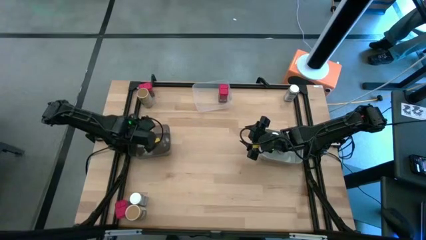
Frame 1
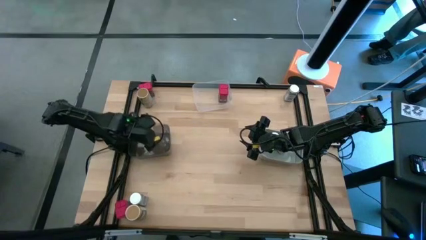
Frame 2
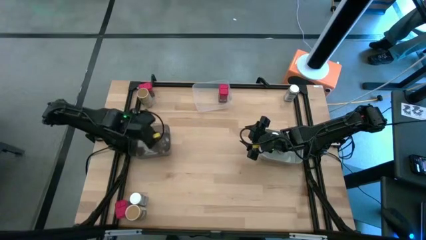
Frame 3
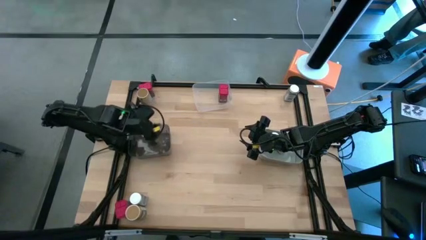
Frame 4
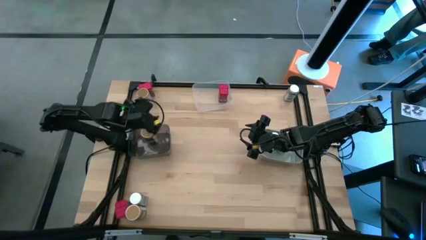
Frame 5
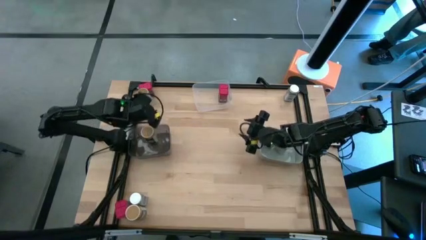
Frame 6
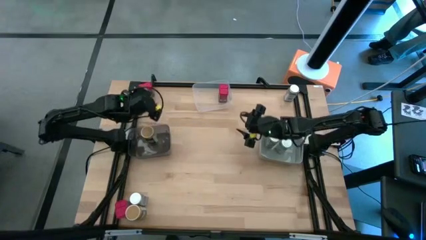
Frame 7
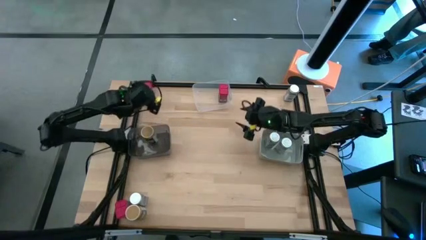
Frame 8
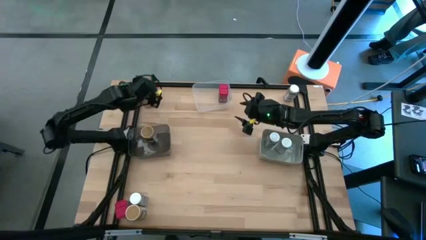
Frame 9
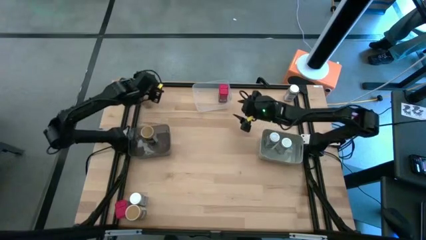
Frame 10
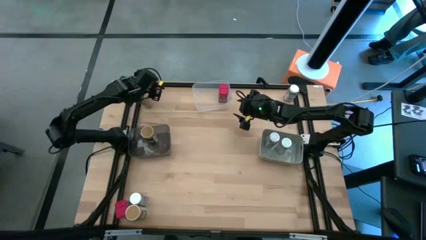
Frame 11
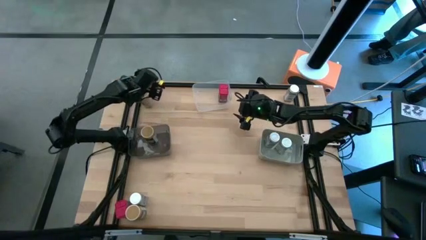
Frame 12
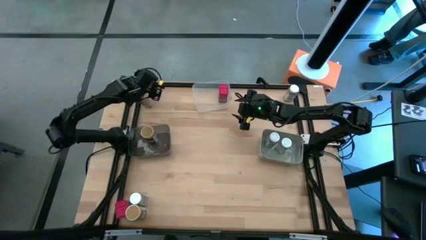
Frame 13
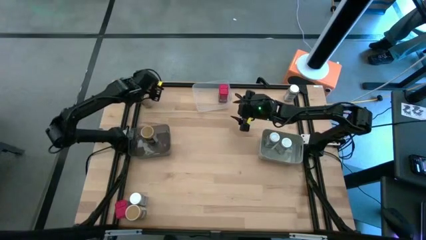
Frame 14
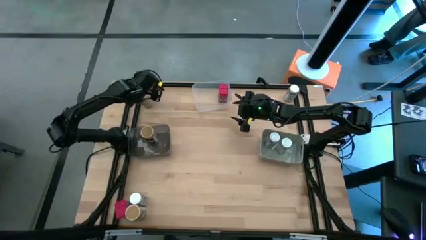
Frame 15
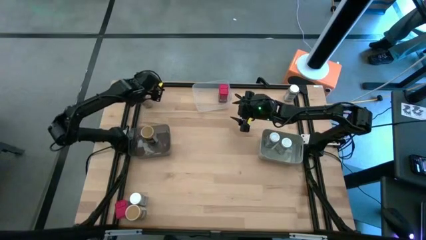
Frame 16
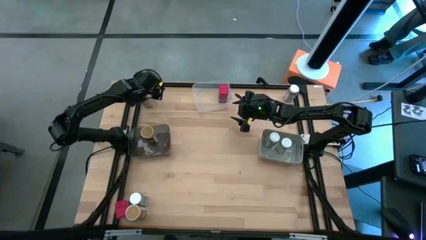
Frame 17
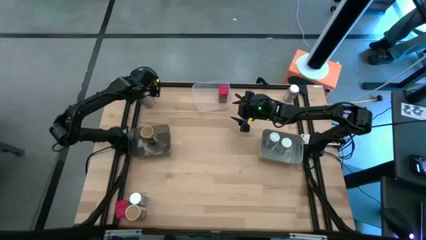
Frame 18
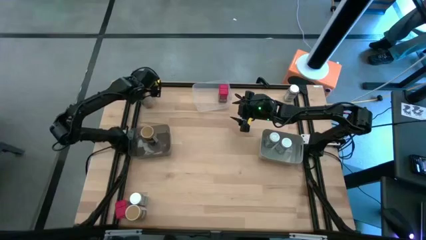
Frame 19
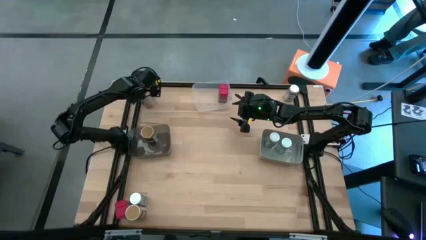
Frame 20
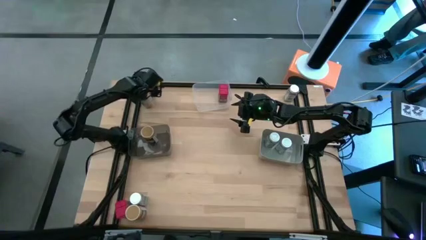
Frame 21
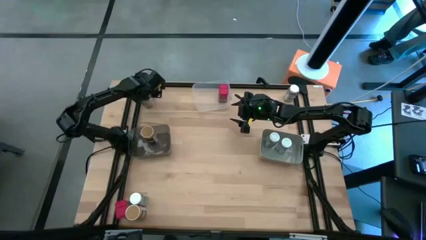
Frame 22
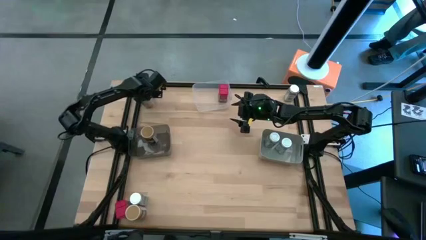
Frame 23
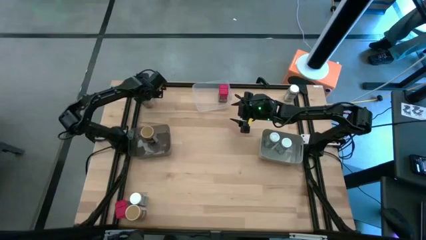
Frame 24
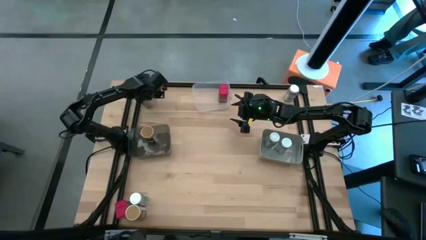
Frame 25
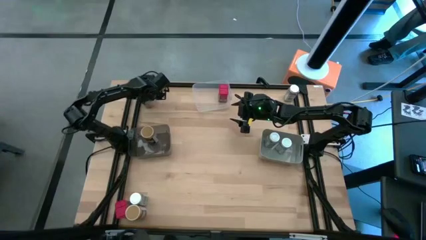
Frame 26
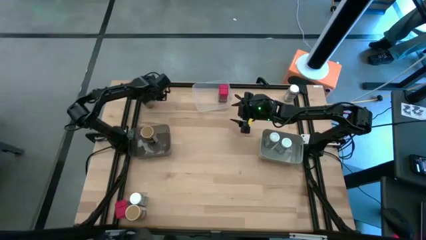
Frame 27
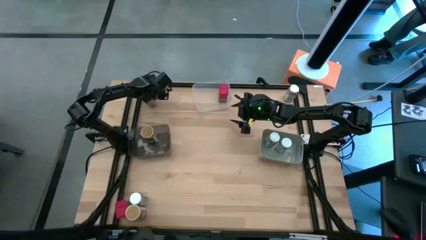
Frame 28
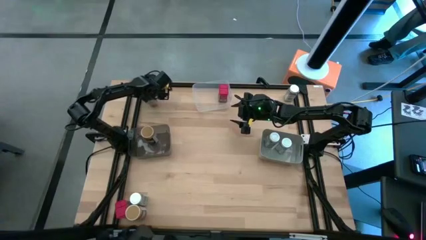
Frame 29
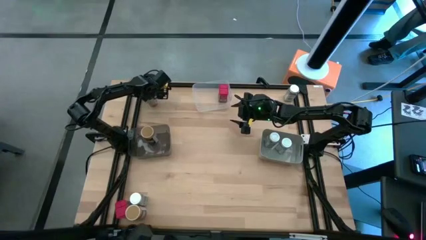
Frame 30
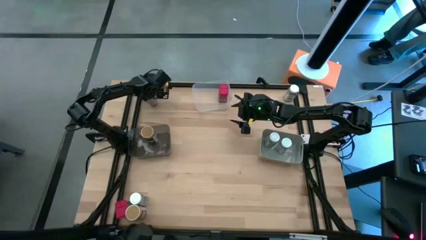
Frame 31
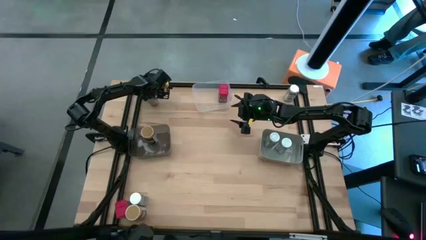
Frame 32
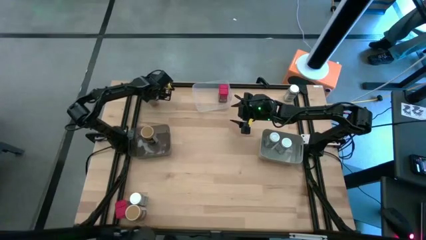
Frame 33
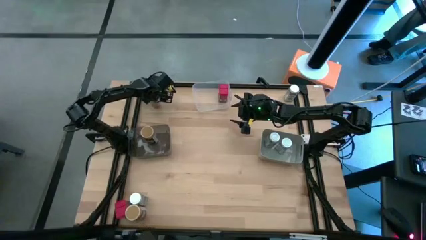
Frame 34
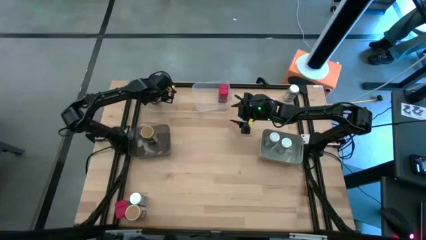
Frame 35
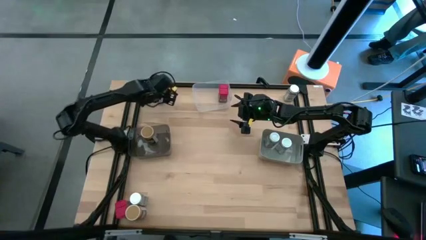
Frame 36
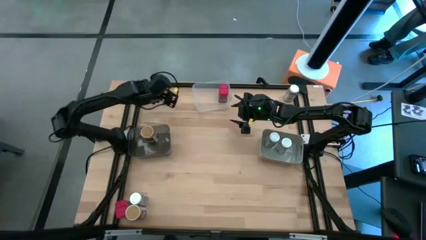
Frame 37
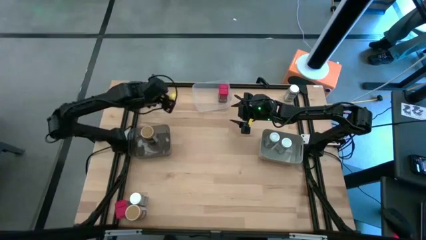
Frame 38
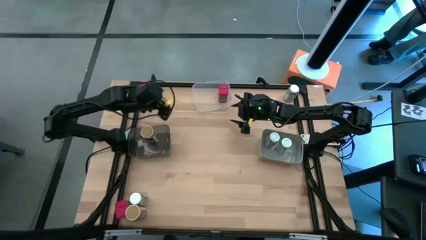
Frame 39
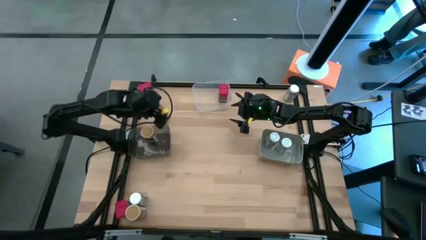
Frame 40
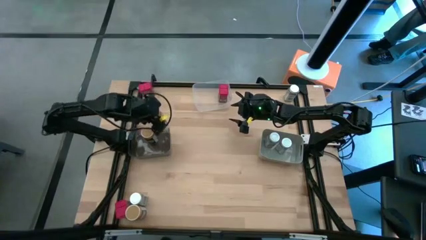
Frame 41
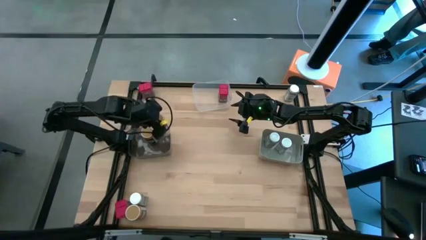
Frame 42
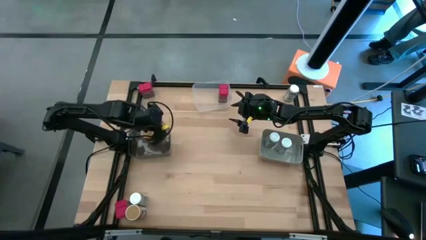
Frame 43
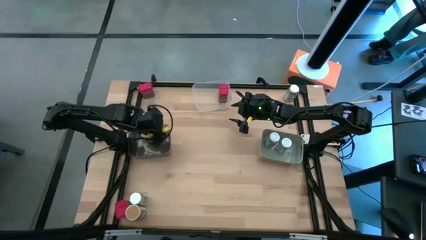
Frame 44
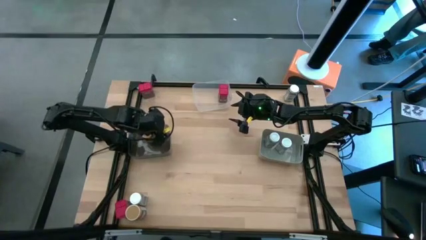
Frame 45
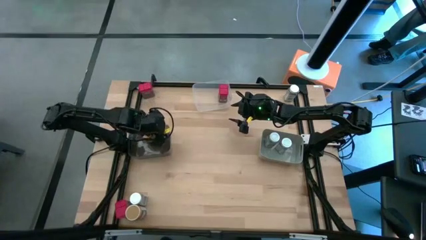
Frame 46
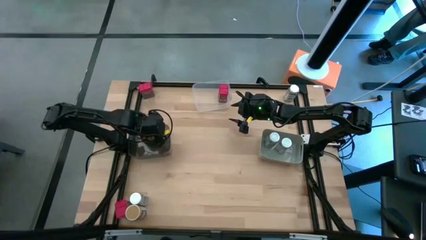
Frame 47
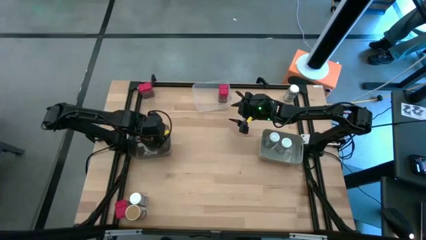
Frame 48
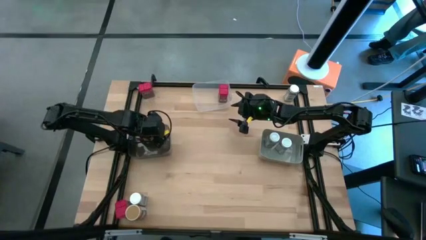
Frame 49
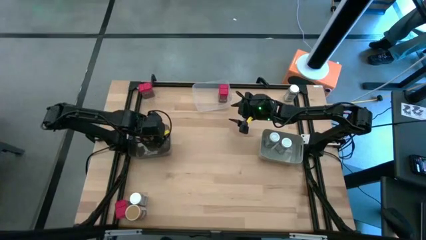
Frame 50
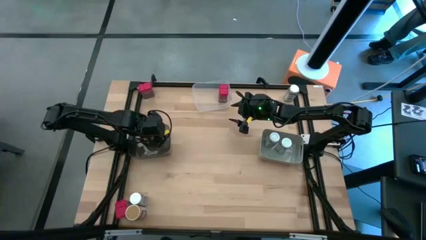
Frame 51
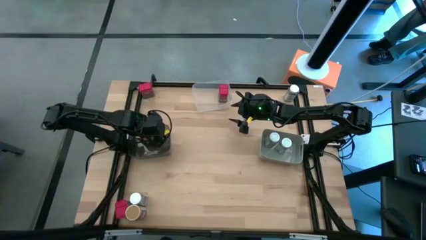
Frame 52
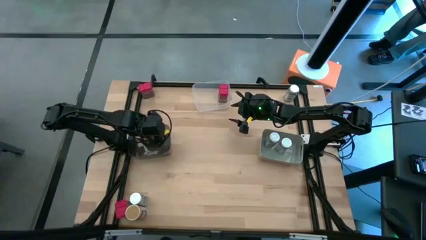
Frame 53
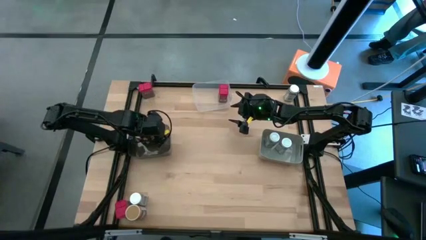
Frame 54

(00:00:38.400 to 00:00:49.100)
Task: Sort spices by type
Put the top brown spice bottle into the black bin

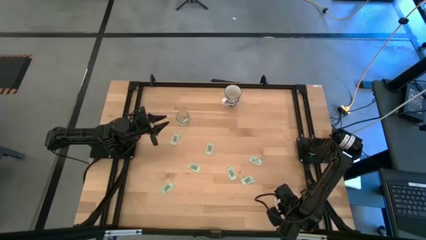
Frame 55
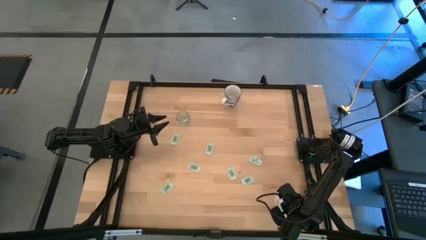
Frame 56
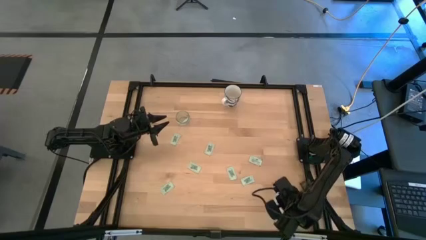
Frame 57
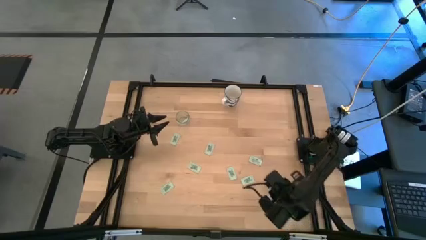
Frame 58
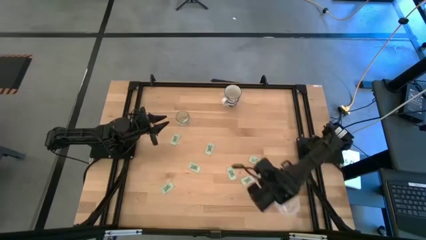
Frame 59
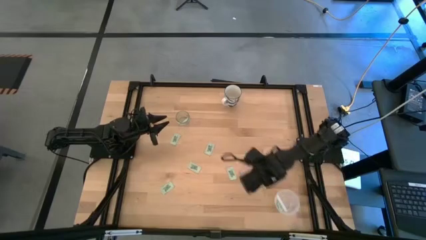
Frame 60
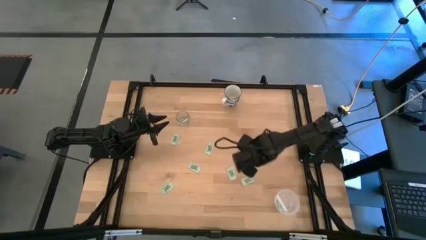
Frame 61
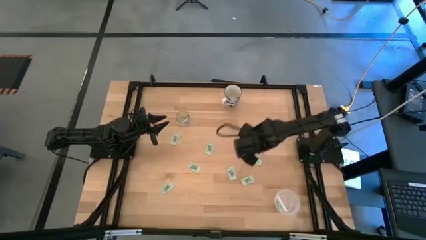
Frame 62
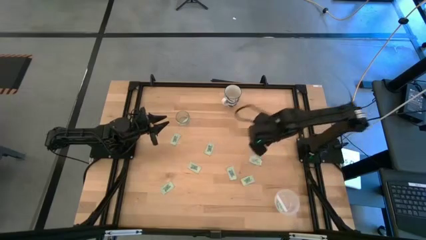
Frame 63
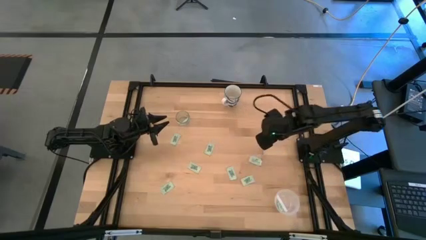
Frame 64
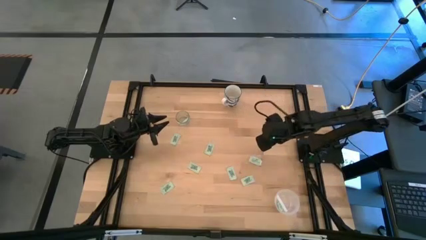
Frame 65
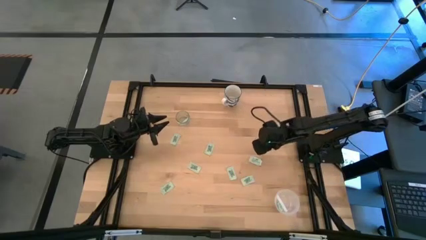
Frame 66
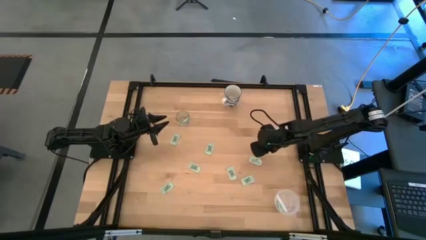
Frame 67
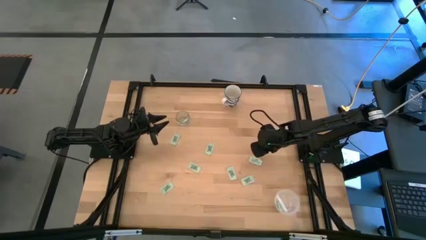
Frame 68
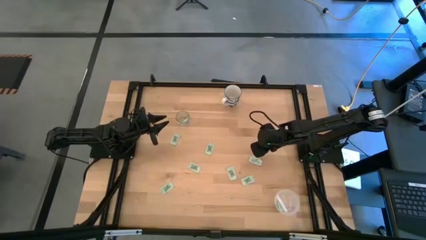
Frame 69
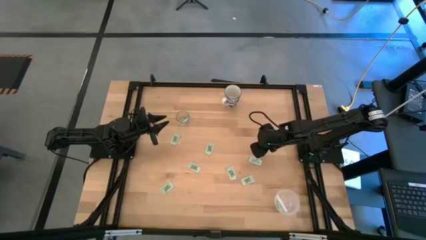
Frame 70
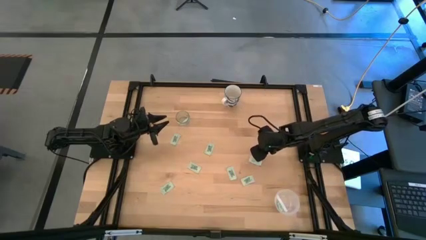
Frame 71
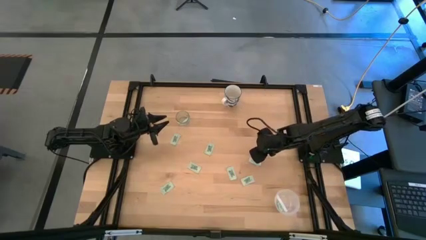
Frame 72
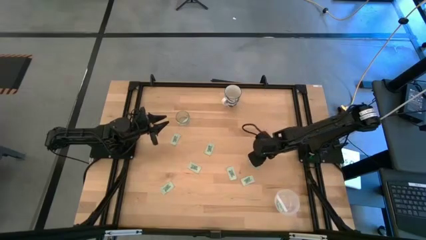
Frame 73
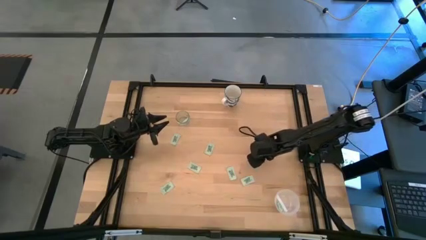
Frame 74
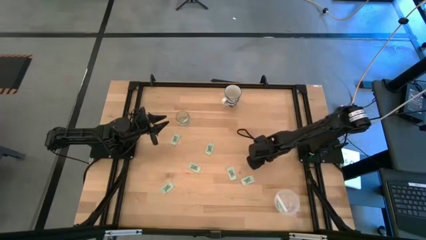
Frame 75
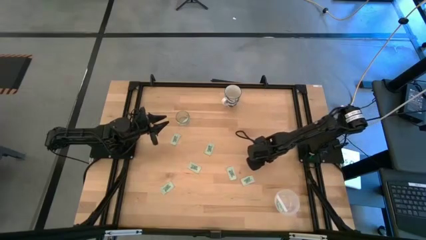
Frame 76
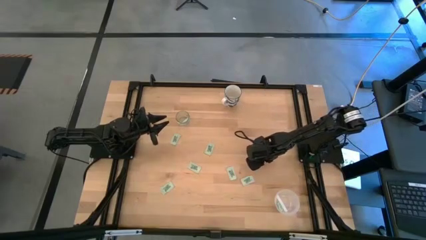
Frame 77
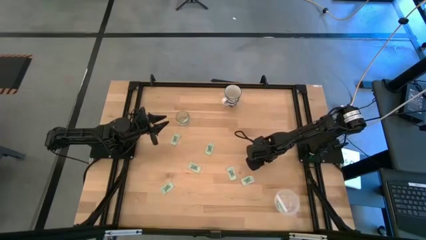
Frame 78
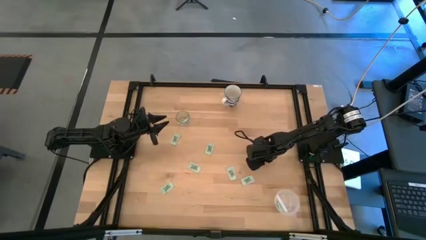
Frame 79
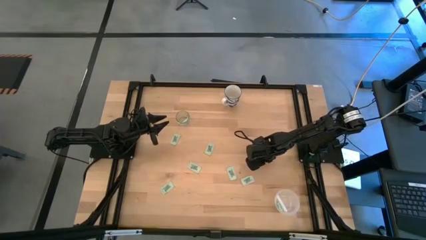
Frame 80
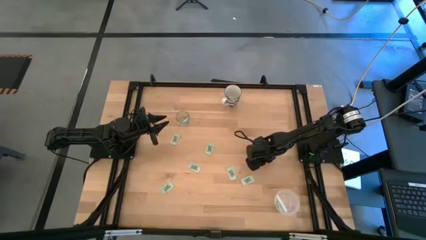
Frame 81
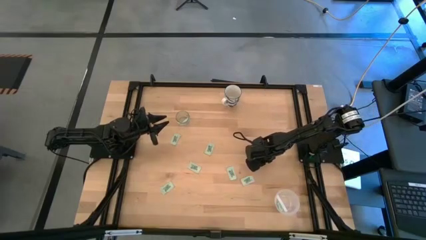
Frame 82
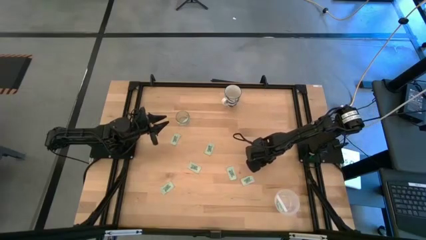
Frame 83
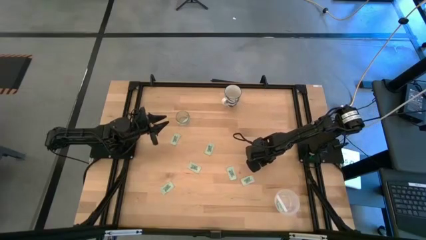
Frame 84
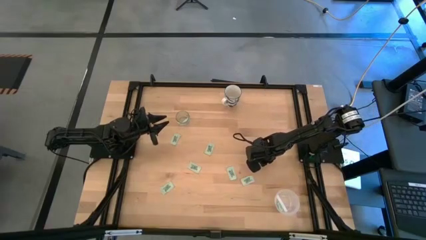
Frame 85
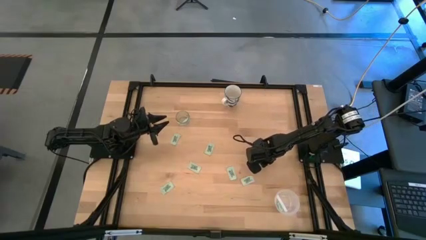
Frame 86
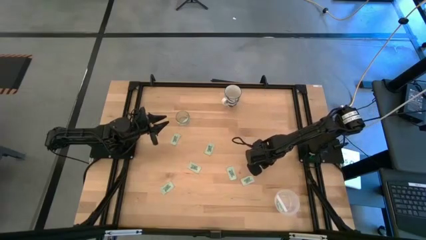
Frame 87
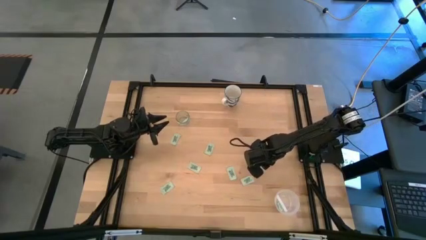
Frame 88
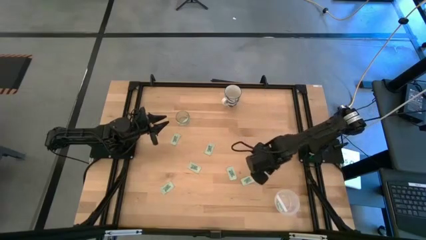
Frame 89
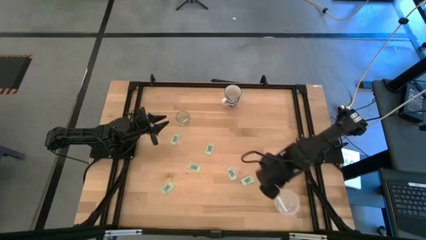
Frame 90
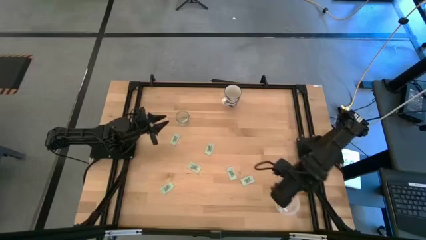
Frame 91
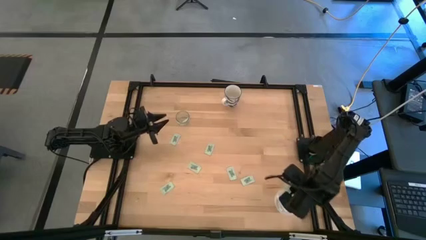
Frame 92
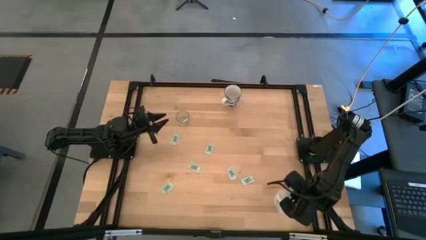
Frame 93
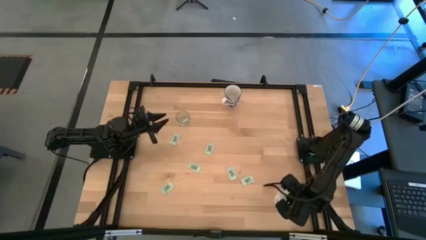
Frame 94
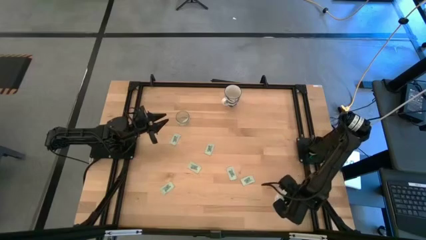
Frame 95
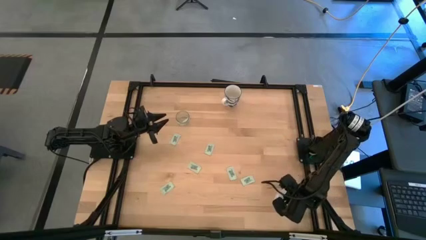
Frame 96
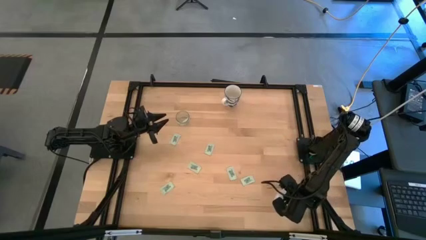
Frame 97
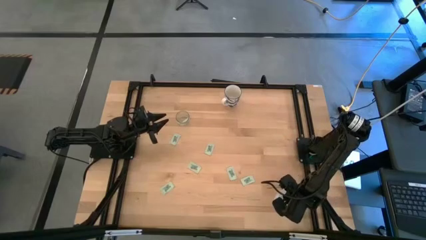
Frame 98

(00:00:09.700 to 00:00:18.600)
Task: Pick and place Stevia / Truvia into bins
Put the green stevia packet into the transparent container
